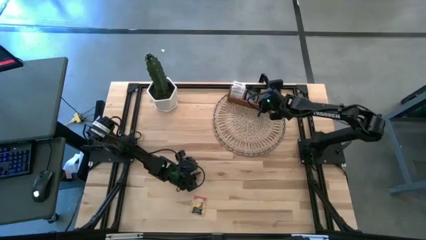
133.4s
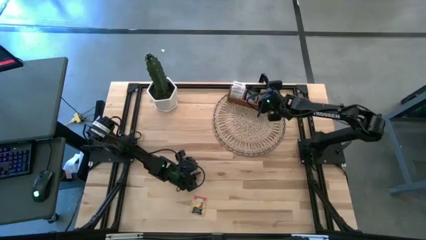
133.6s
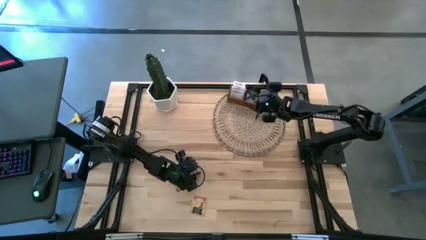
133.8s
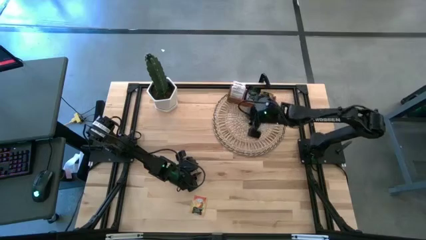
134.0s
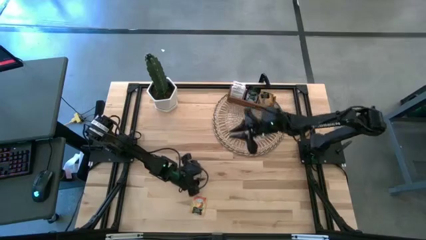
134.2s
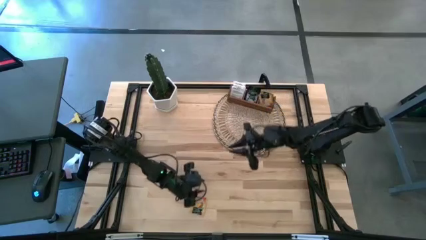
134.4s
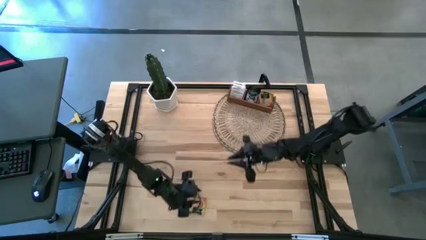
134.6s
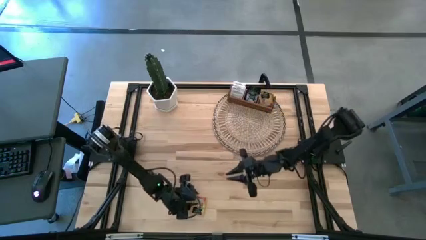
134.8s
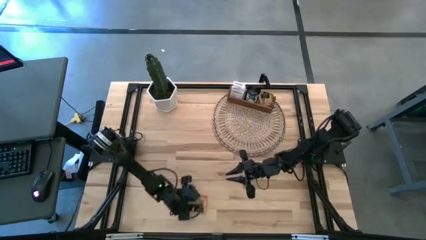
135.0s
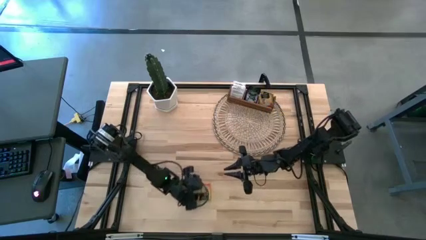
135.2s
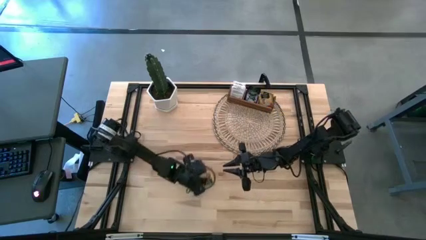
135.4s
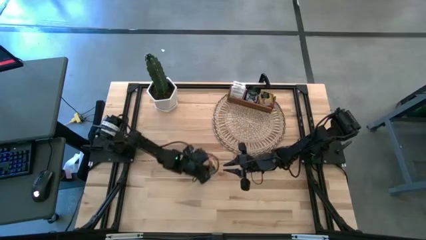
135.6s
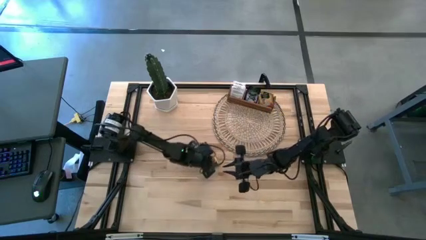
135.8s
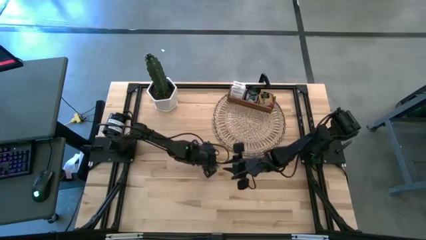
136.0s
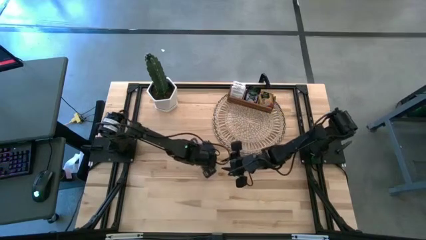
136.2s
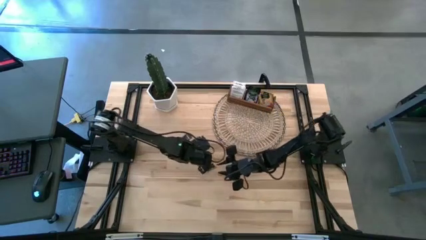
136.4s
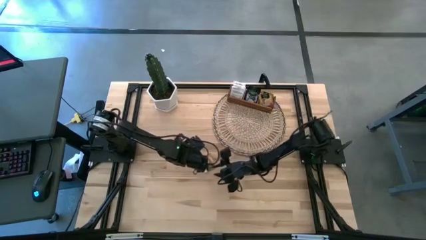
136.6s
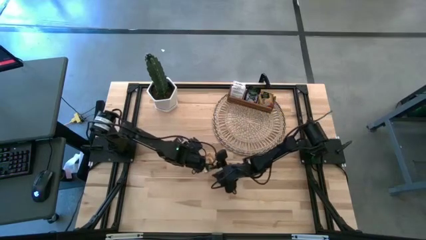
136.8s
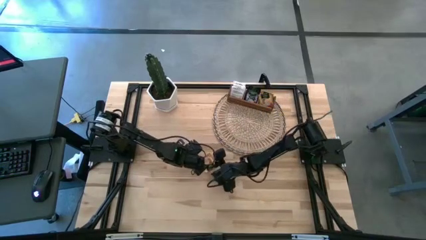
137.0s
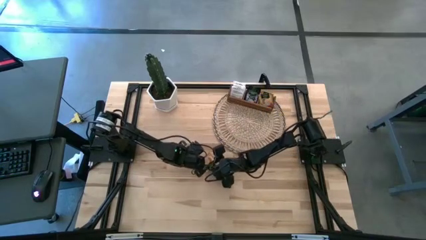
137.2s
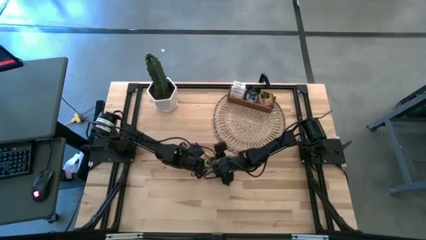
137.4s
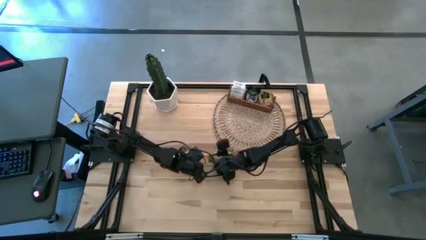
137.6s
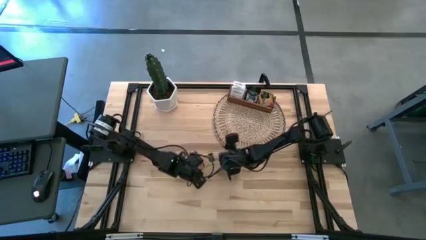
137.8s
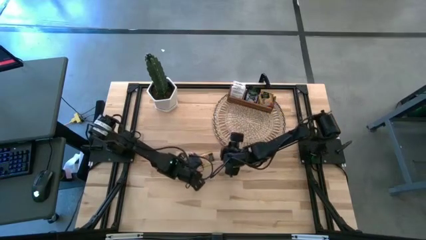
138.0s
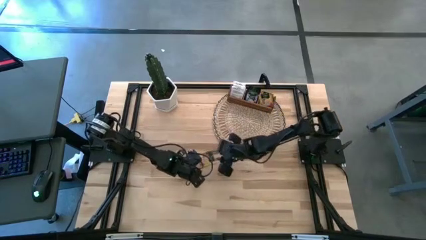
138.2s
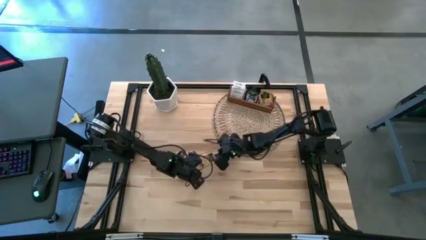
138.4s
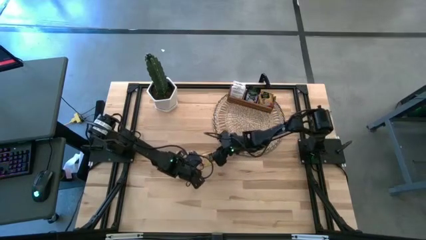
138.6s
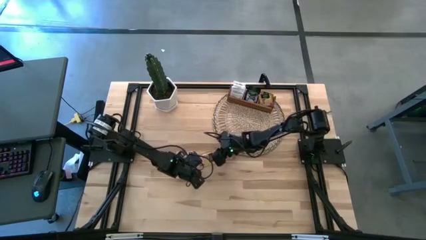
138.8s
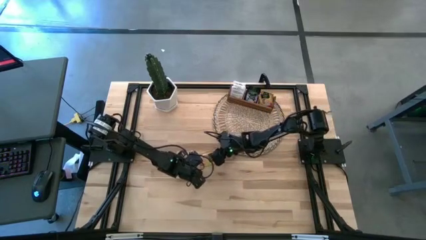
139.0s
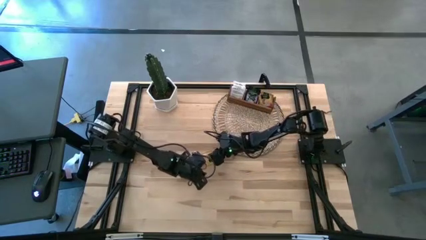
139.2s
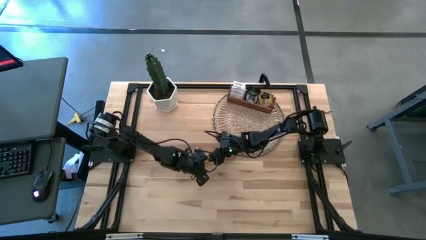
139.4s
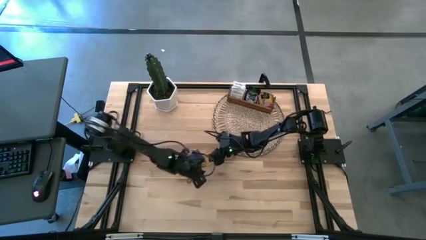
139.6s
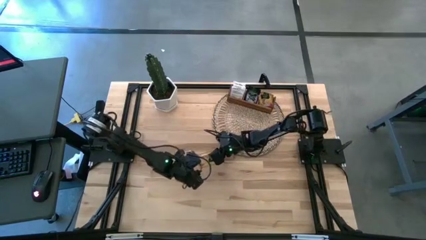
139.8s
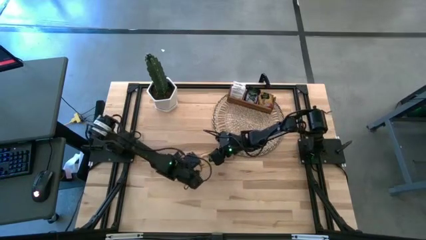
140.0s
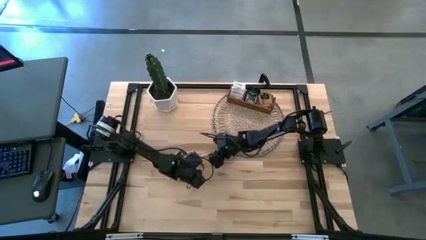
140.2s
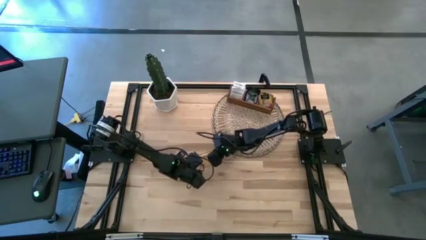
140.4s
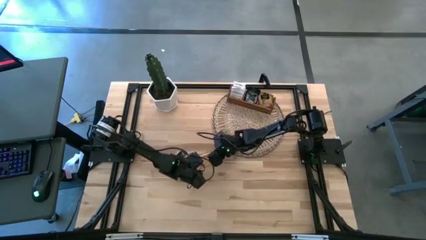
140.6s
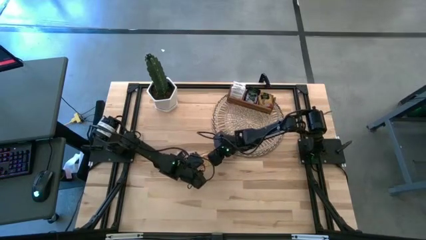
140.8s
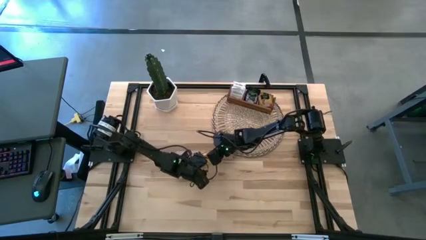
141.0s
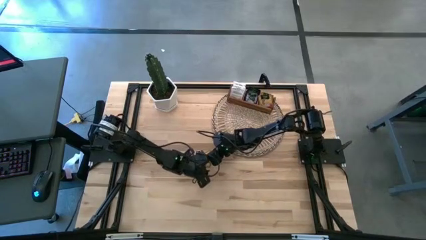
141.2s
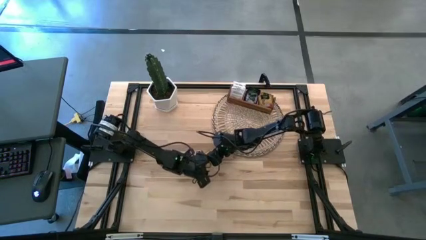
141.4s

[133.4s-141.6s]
Task: Pick & Place Tea
Put the yellow tea bag into the right section of the wooden organizer

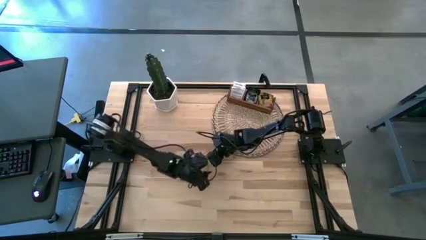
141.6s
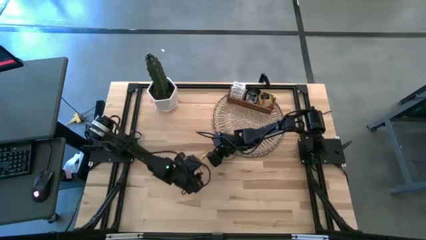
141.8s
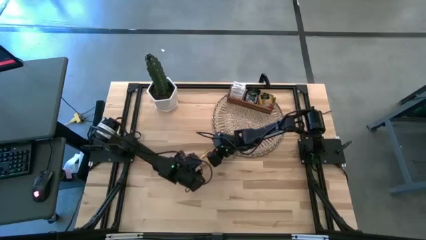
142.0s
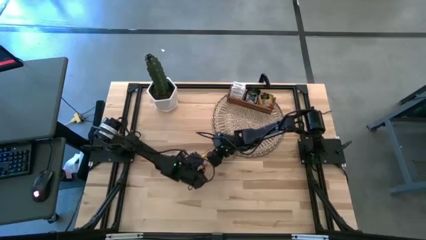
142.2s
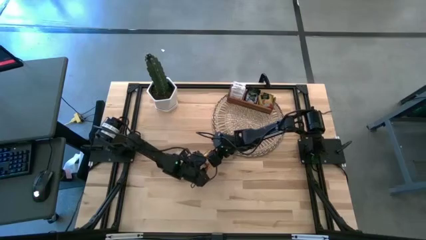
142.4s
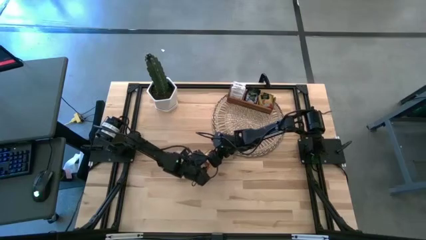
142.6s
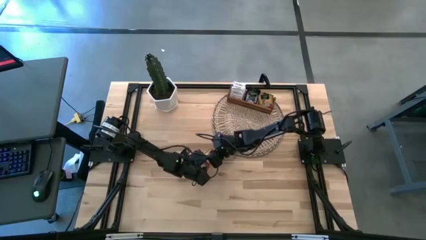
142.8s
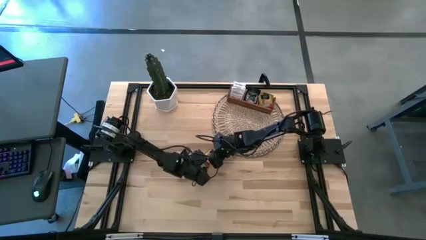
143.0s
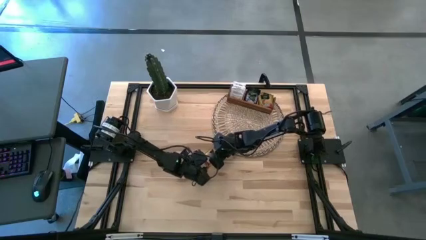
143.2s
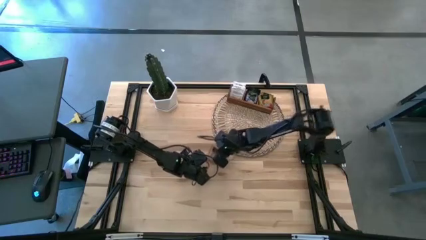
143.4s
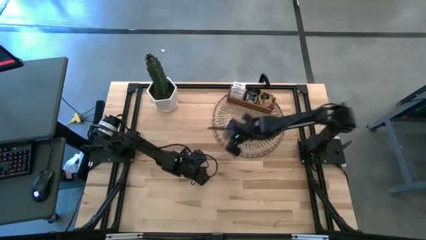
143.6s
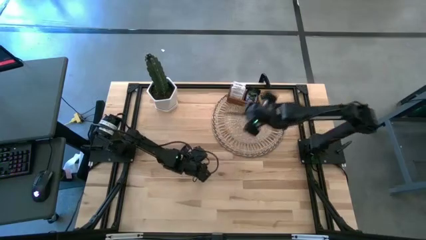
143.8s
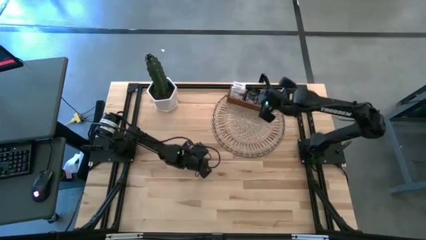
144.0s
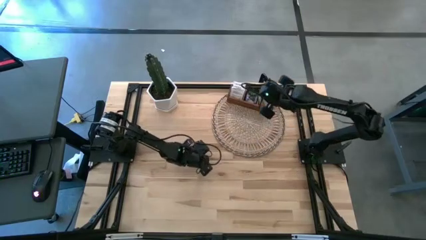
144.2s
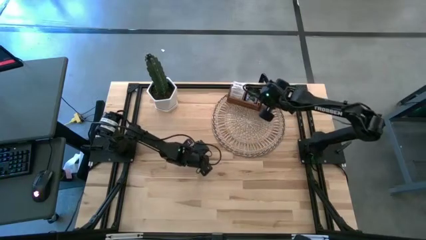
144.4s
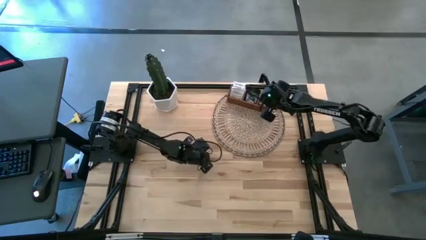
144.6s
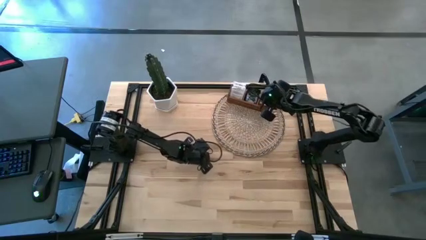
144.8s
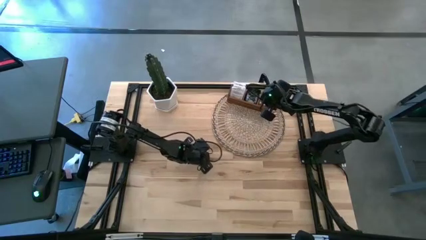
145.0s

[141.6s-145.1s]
Put the yellow tea bag into the right section of the wooden organizer

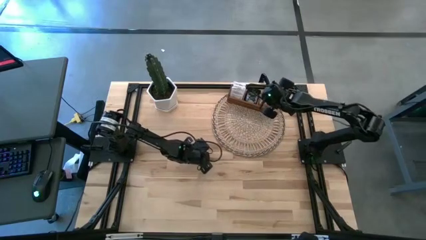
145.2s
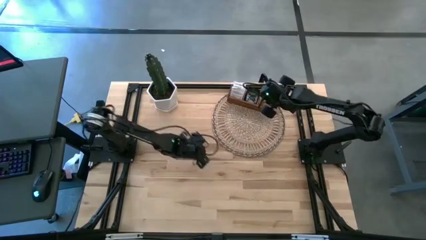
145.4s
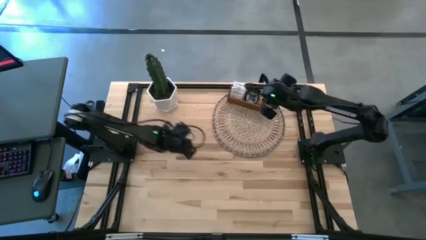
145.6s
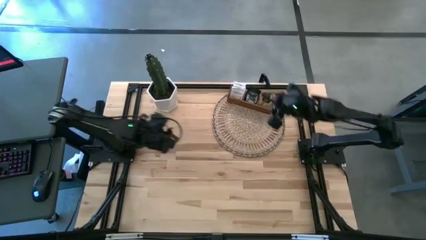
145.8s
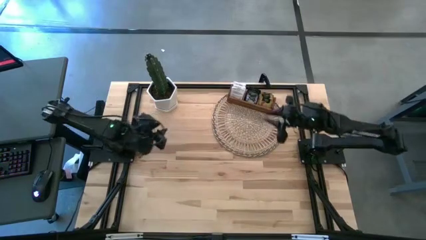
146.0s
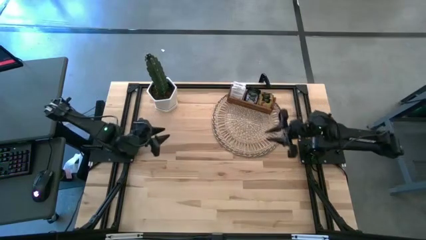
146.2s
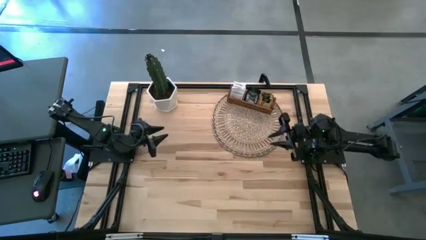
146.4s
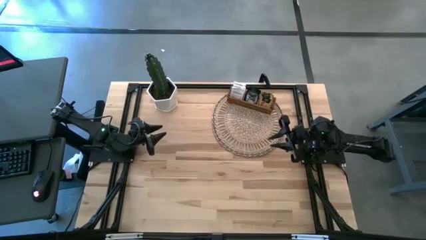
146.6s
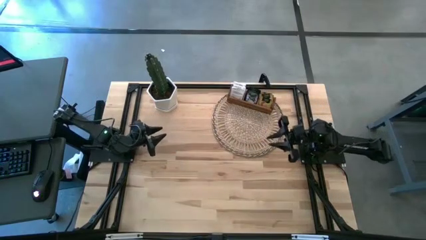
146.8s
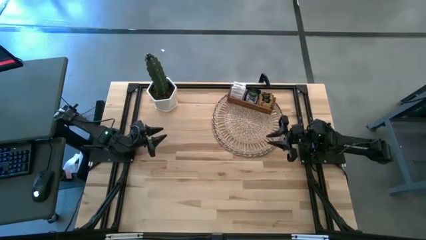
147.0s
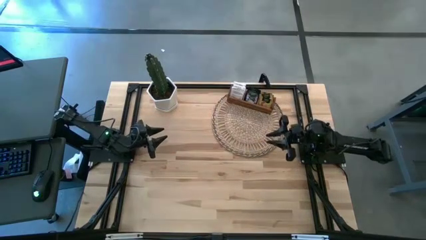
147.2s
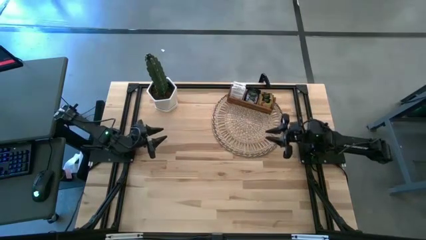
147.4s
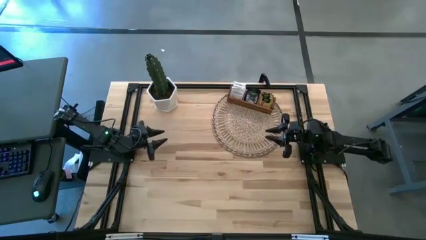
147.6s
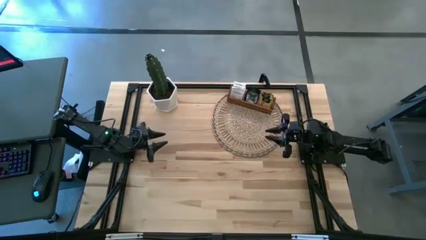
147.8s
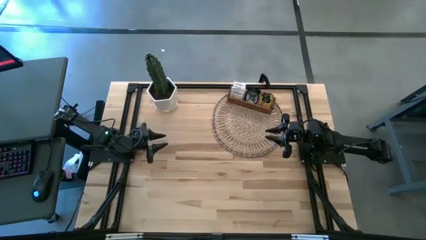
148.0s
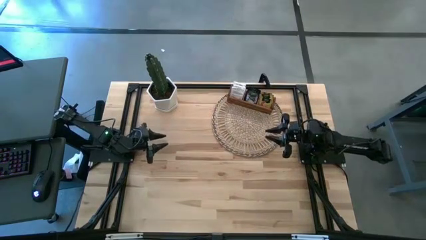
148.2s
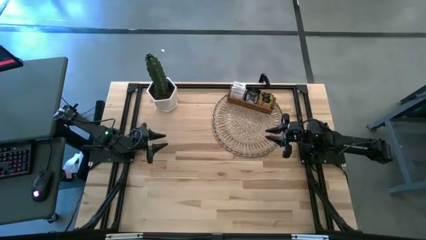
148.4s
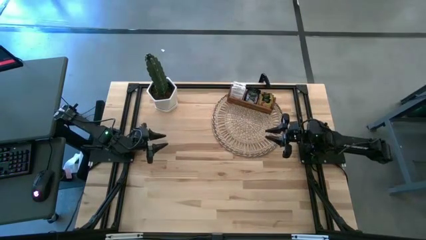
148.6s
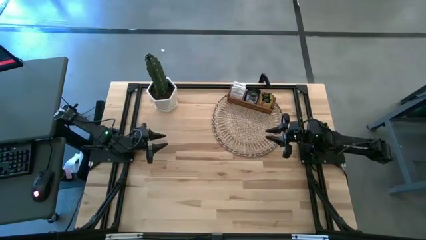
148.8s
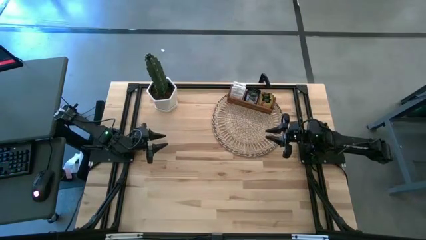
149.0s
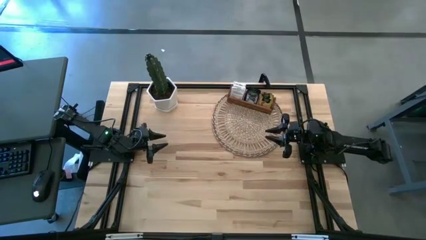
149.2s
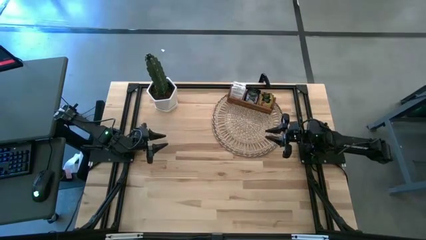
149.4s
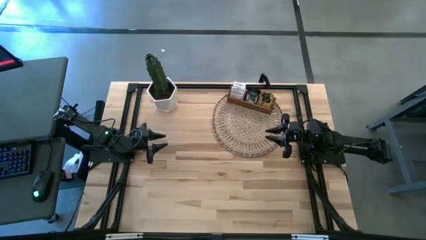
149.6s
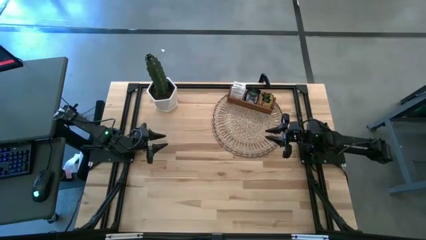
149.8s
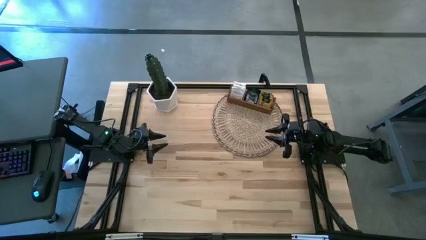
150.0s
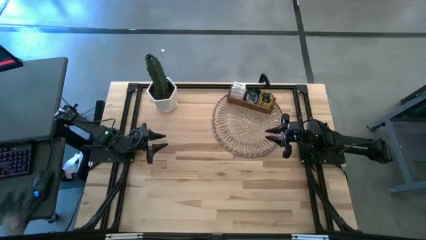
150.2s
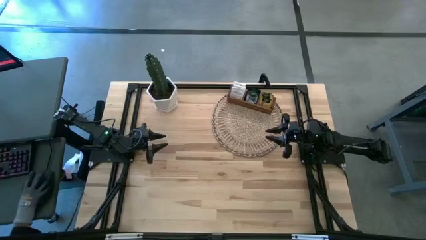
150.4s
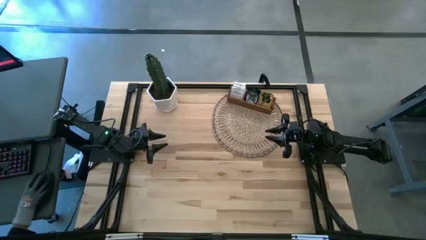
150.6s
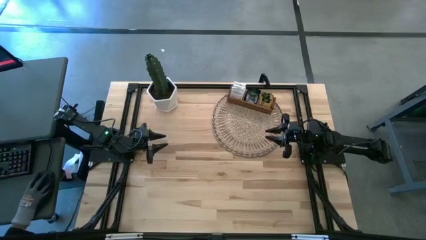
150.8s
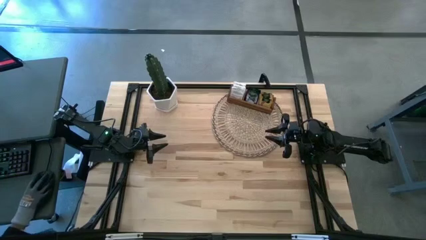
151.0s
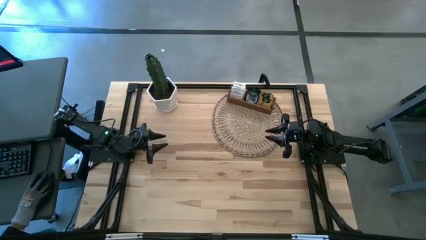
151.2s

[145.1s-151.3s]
Return to Home Position
